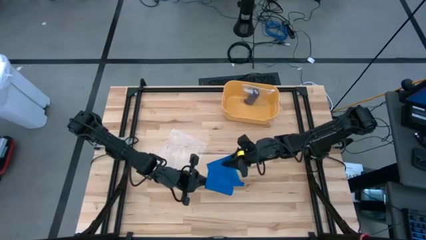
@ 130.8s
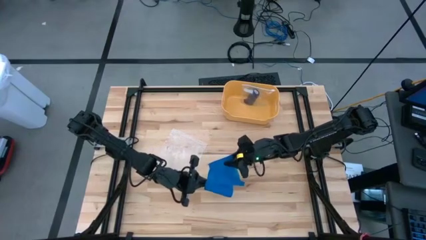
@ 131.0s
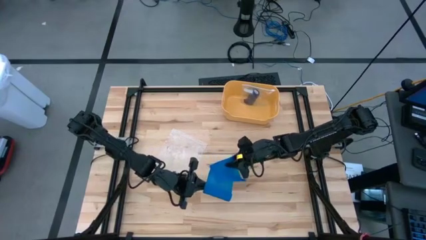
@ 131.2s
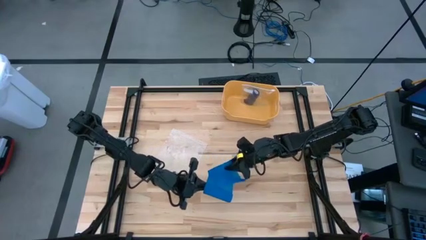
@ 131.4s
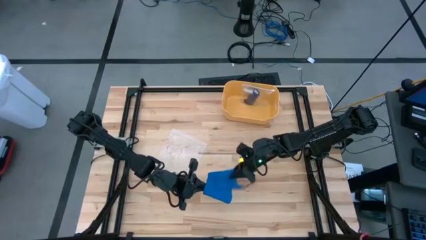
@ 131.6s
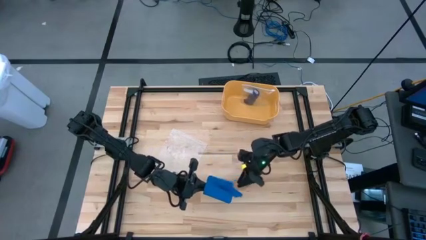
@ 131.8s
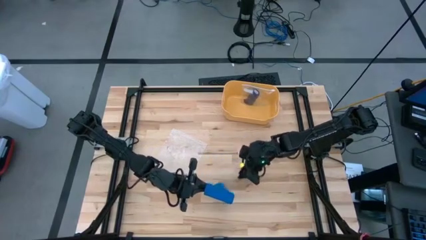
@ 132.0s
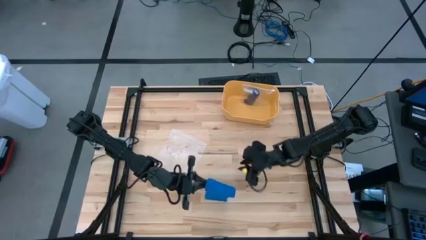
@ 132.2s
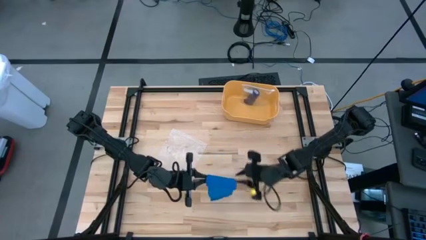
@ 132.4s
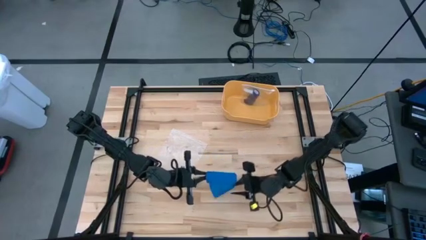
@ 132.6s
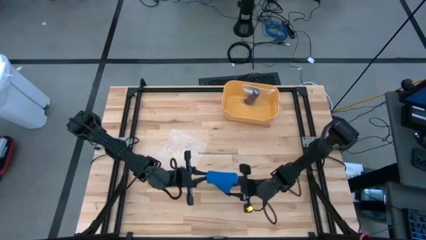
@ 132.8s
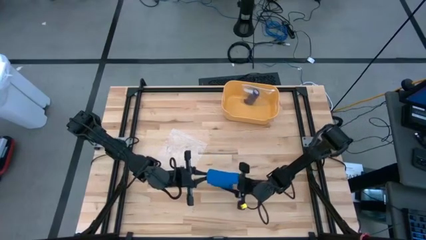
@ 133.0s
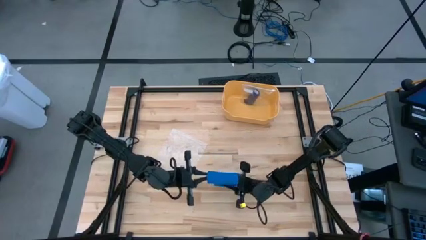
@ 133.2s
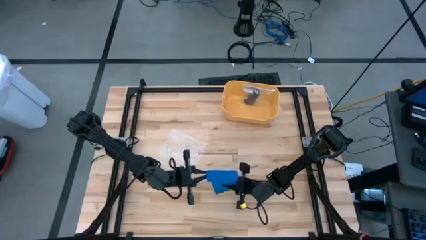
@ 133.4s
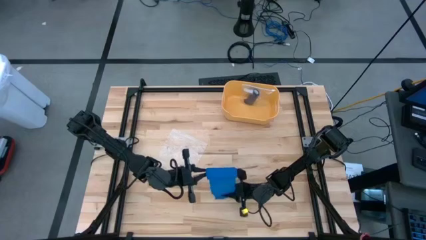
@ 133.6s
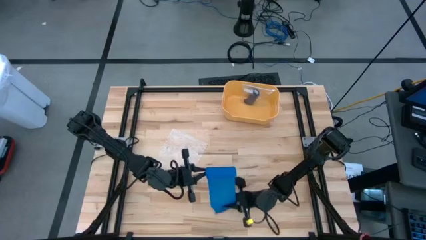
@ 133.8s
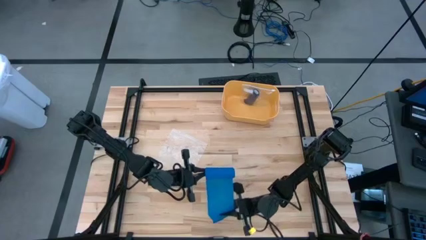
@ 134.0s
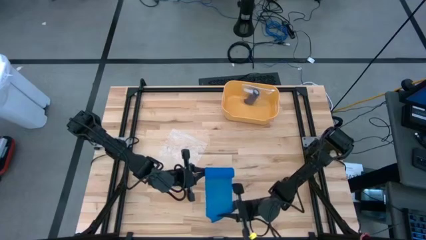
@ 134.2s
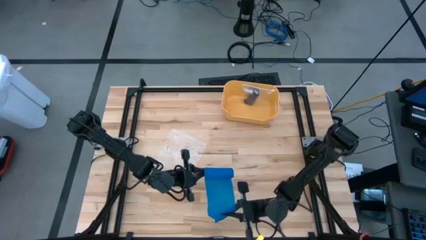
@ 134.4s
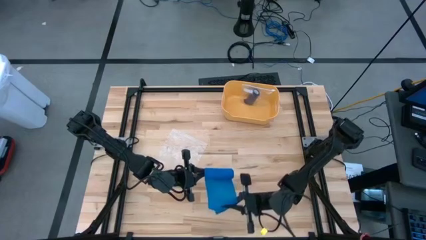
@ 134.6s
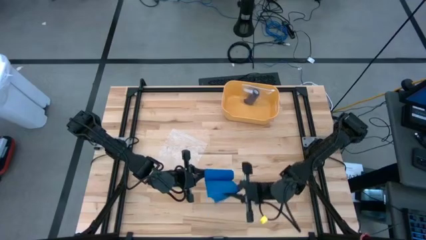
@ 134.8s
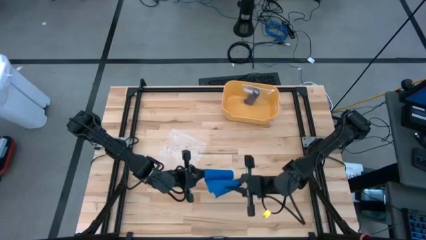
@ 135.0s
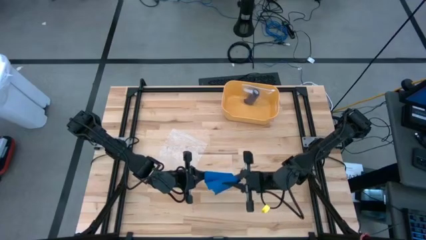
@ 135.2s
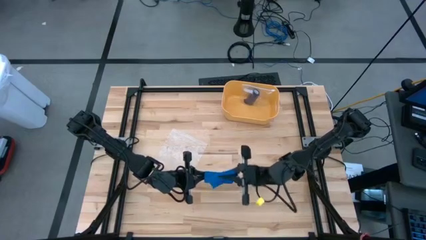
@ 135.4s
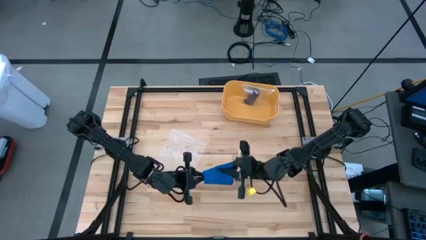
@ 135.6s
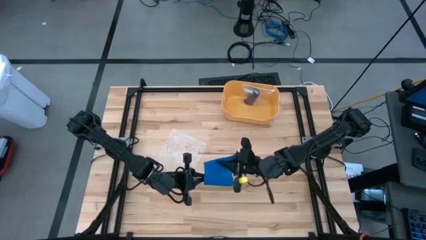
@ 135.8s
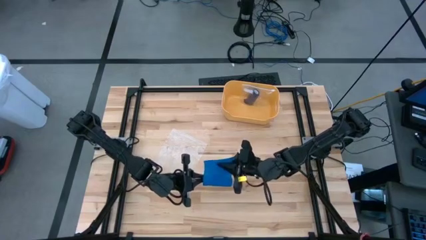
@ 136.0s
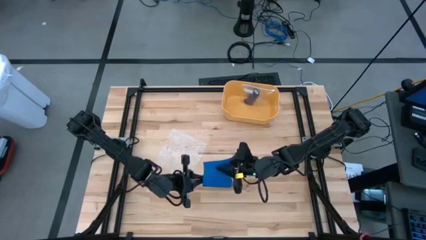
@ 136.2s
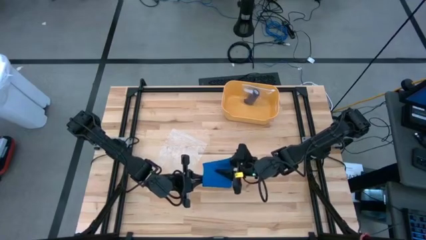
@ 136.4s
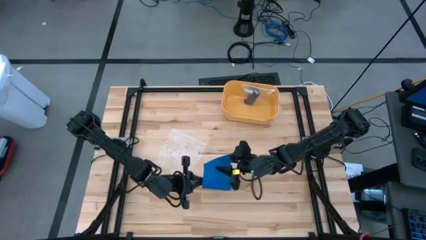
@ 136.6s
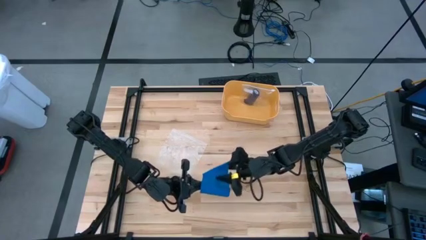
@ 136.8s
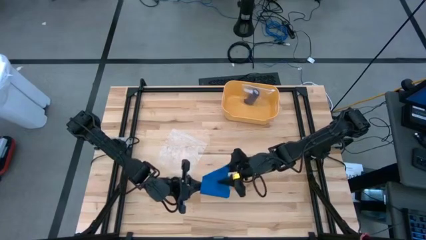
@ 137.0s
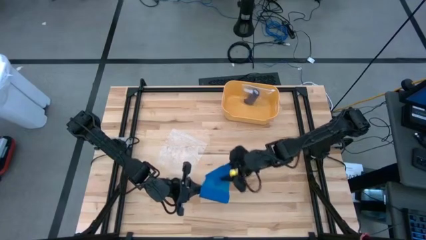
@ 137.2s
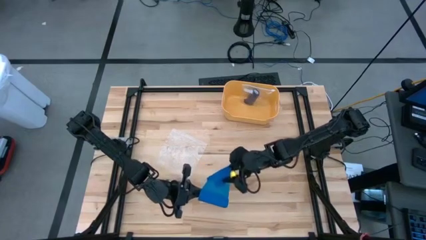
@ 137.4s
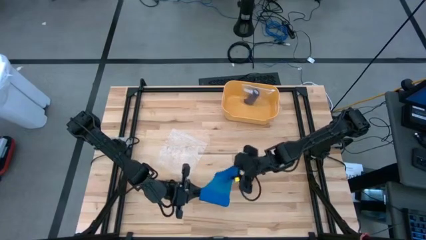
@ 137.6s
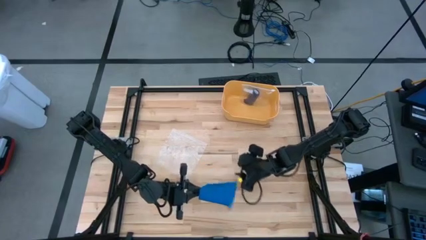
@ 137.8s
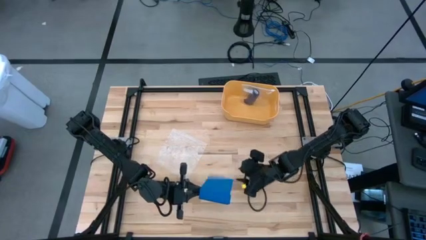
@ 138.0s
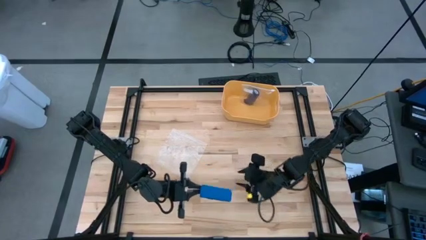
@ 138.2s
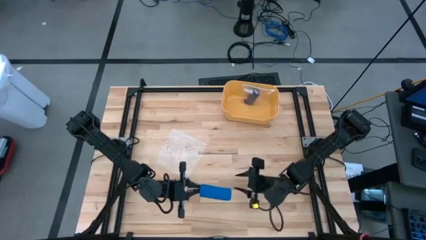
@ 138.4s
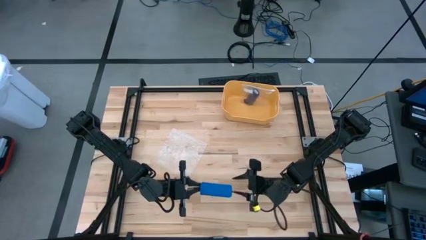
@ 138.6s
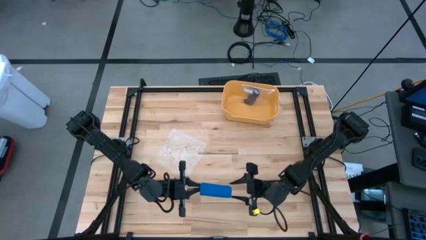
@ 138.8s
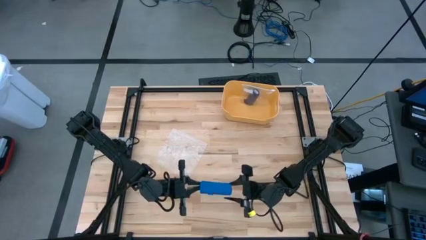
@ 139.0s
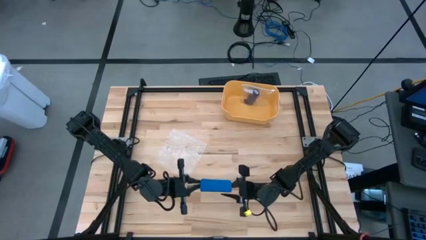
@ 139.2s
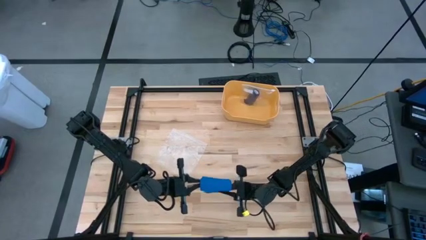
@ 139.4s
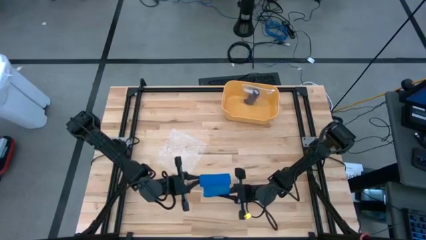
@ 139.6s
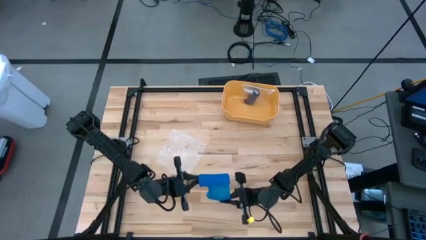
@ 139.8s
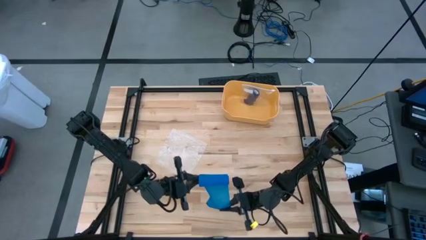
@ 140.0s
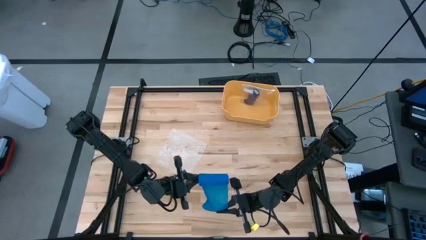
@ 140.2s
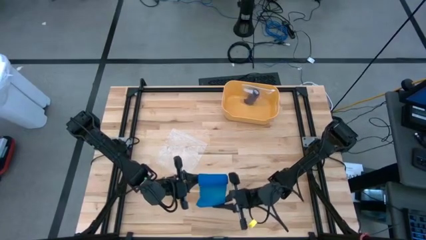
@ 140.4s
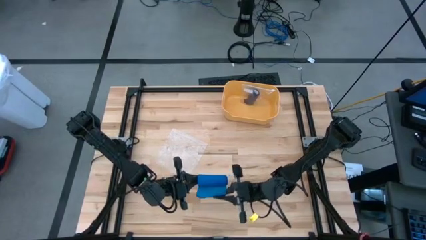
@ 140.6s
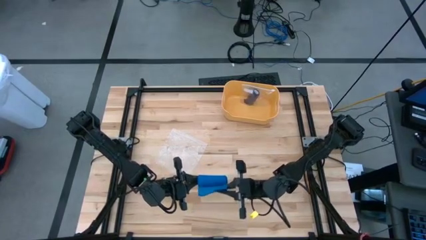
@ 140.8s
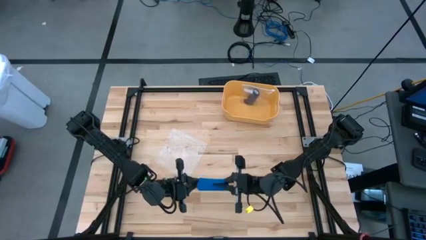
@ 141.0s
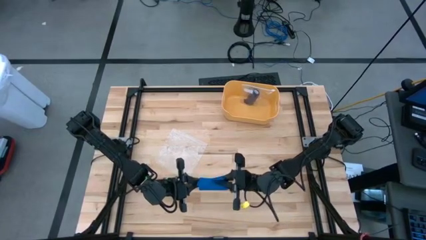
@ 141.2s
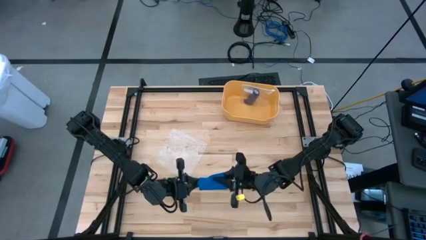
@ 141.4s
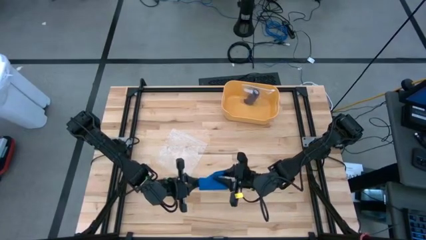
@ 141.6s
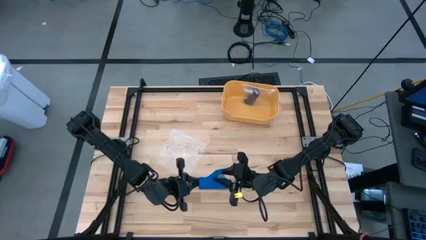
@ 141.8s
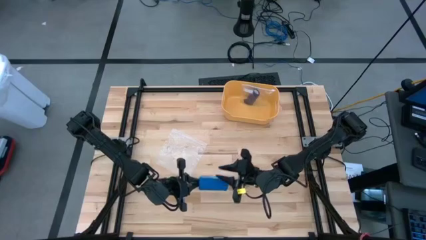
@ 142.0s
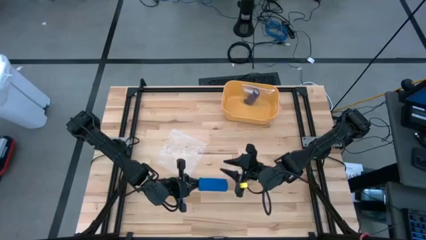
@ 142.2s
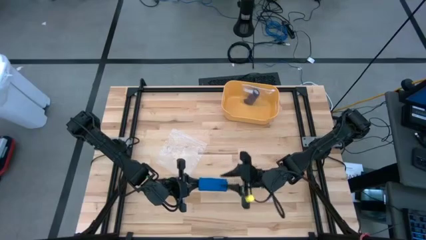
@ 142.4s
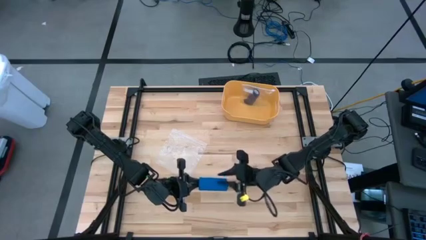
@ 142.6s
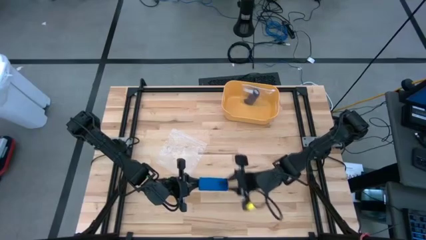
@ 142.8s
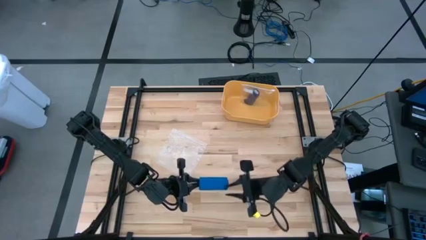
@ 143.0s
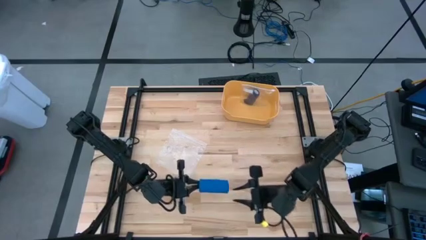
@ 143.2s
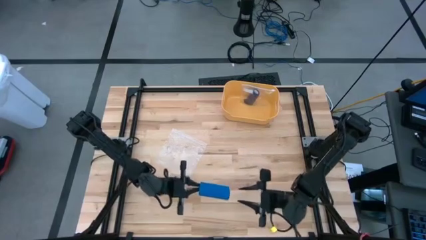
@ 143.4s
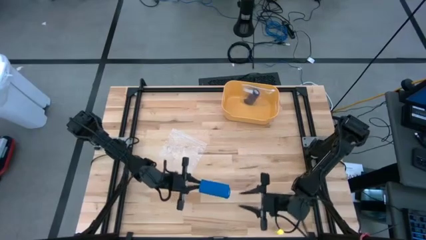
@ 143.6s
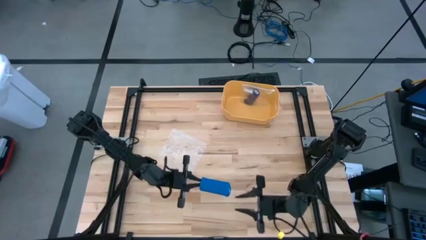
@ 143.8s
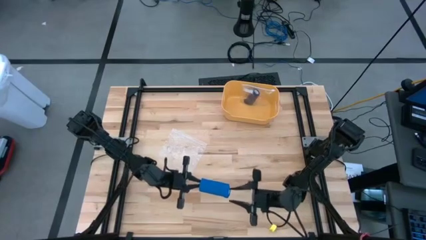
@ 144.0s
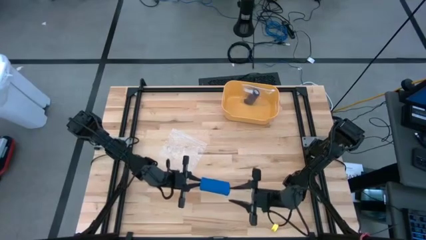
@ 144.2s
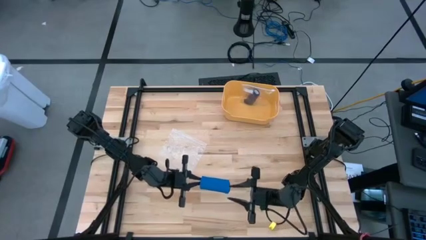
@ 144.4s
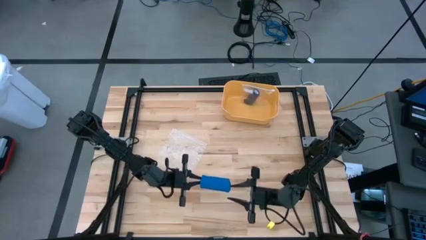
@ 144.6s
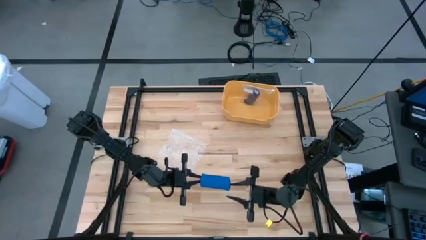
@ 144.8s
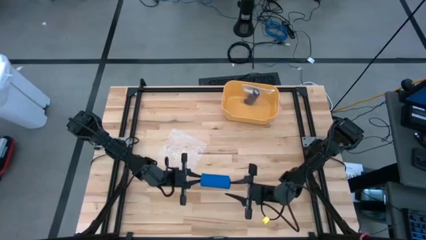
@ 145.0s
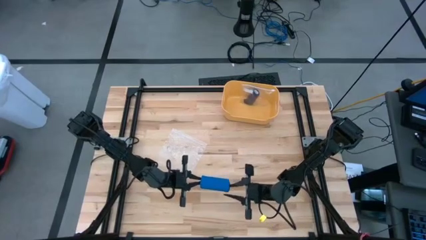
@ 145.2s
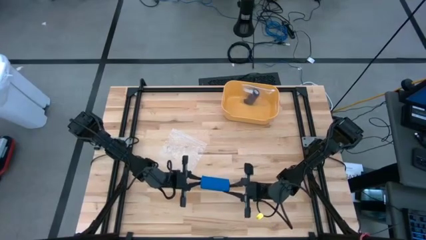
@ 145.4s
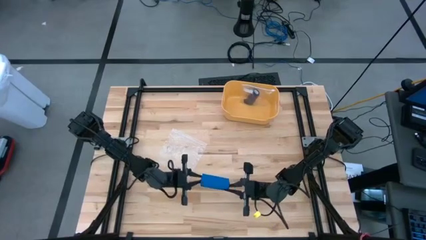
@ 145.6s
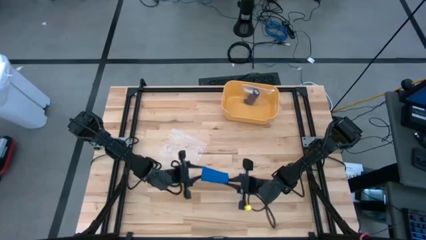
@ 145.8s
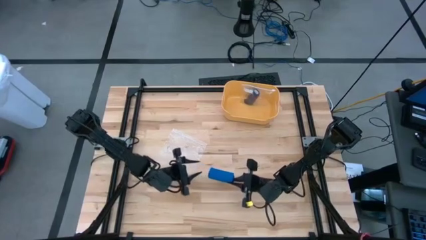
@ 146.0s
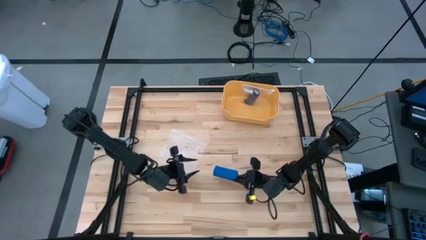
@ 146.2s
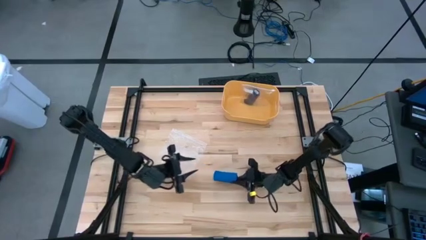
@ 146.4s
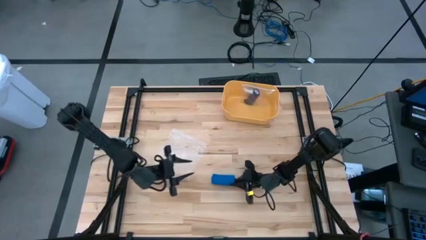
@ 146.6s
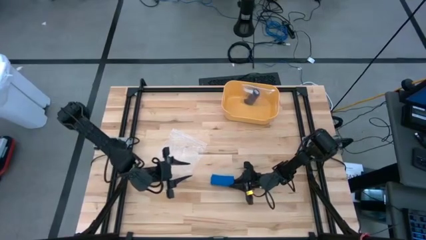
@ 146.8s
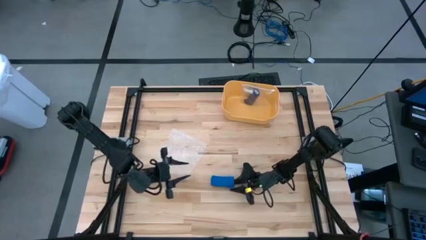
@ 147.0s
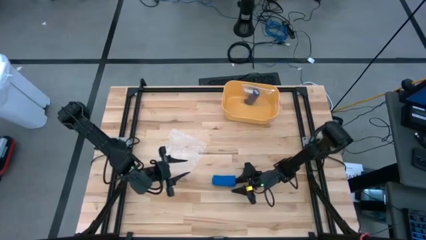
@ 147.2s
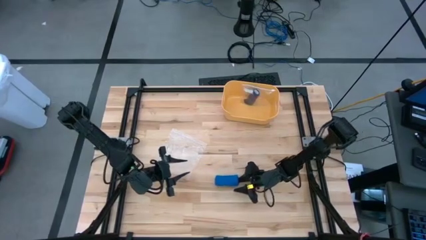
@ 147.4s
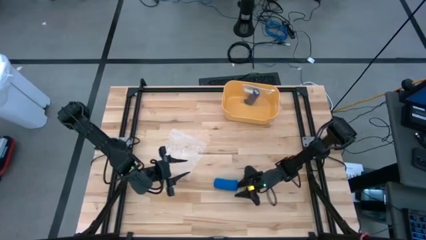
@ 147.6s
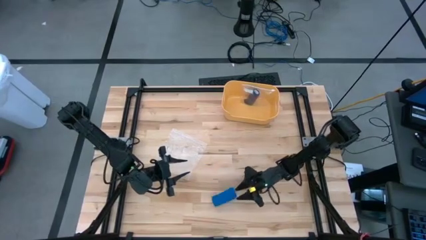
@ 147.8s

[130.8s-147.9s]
Task: Roll bandage
Roll the blue bandage
